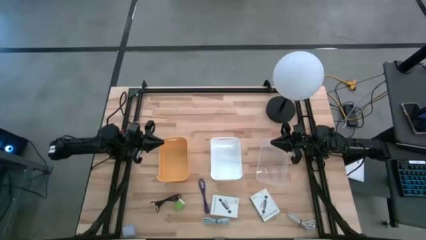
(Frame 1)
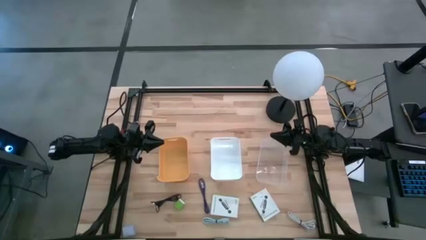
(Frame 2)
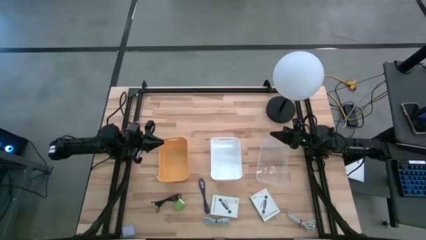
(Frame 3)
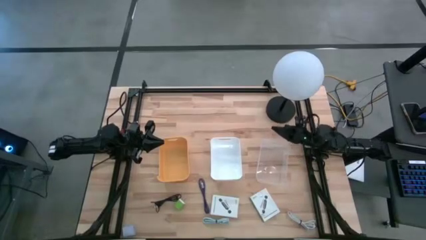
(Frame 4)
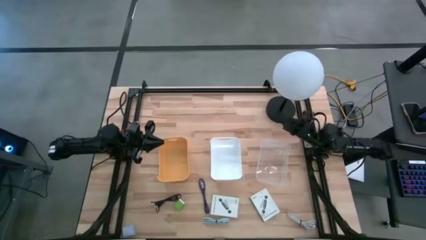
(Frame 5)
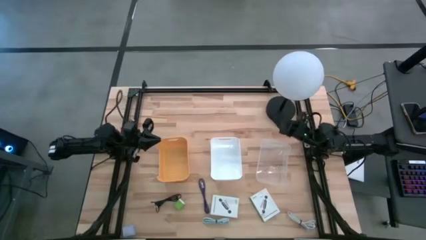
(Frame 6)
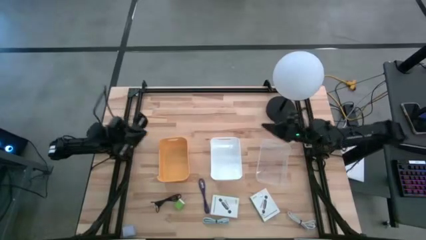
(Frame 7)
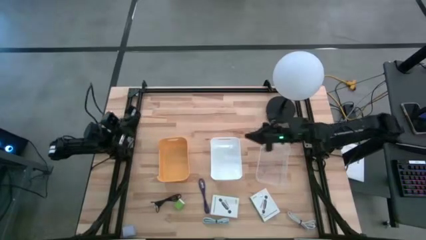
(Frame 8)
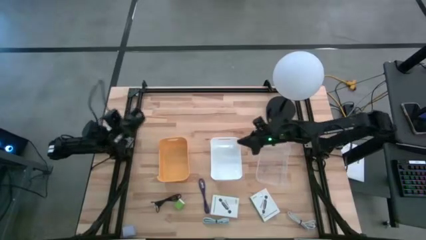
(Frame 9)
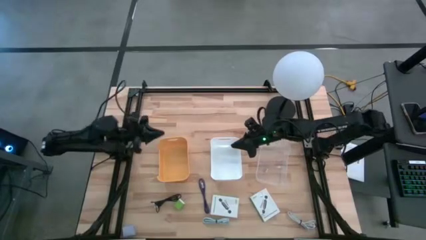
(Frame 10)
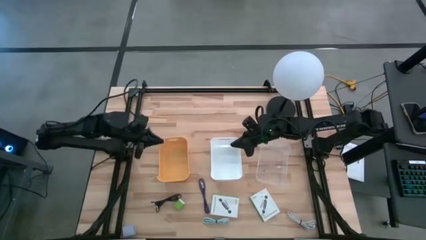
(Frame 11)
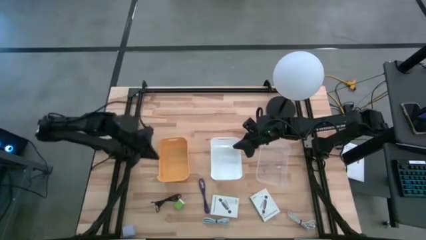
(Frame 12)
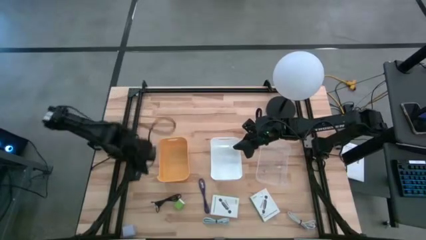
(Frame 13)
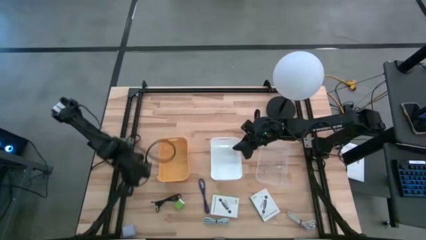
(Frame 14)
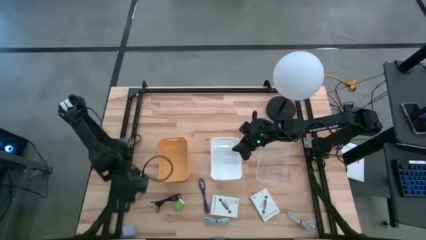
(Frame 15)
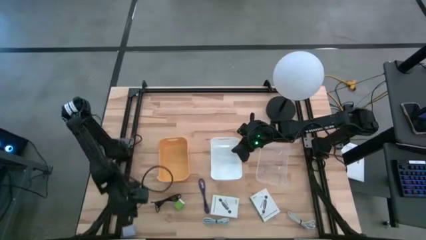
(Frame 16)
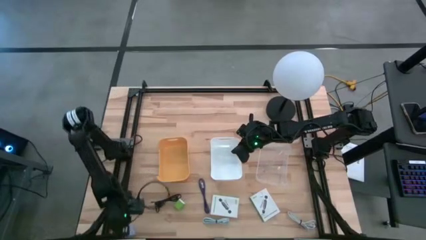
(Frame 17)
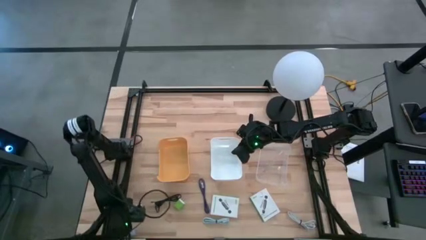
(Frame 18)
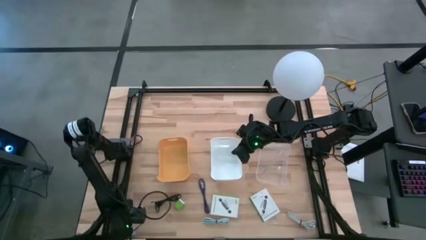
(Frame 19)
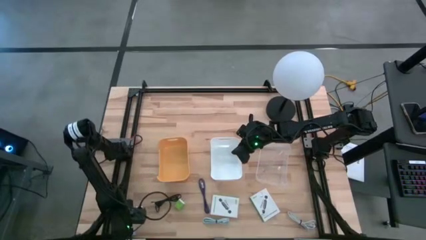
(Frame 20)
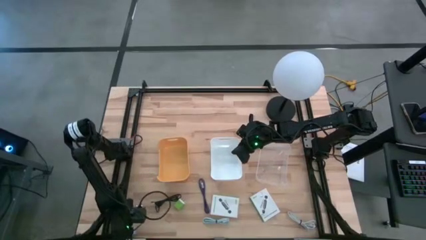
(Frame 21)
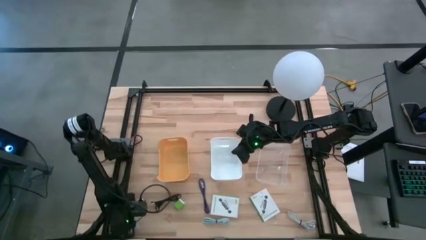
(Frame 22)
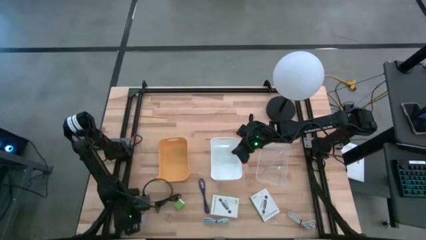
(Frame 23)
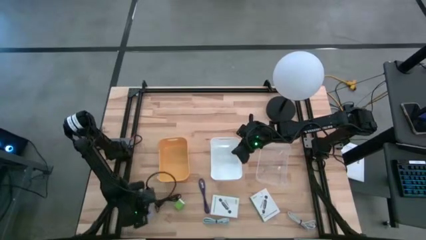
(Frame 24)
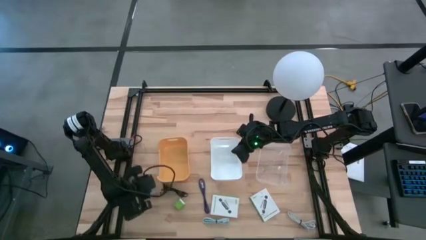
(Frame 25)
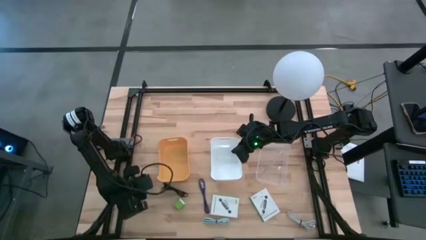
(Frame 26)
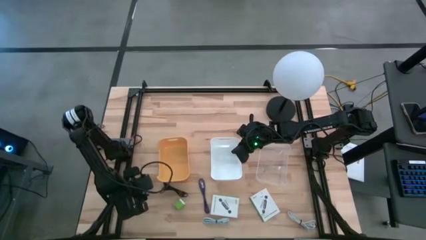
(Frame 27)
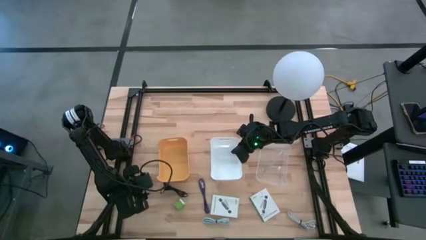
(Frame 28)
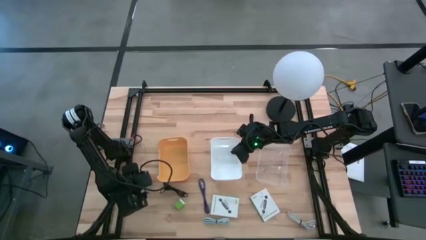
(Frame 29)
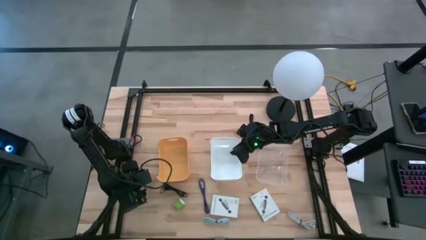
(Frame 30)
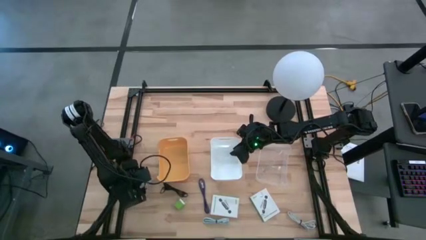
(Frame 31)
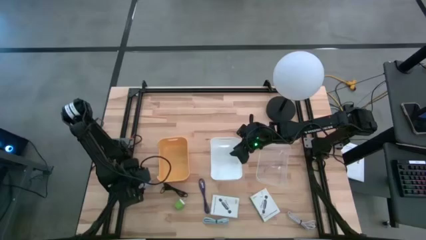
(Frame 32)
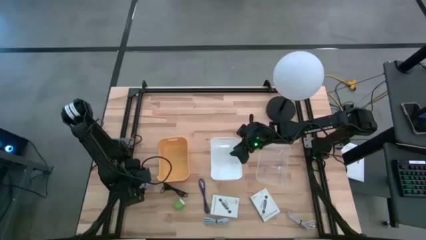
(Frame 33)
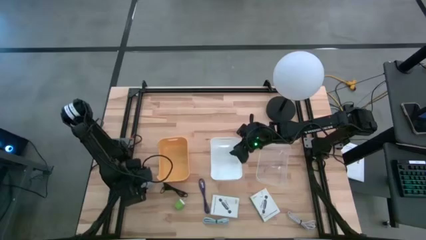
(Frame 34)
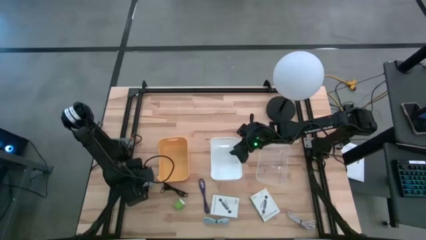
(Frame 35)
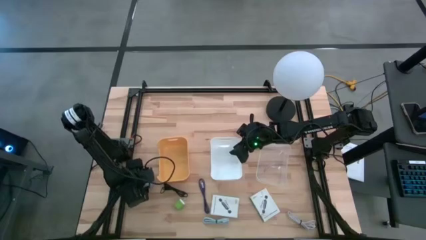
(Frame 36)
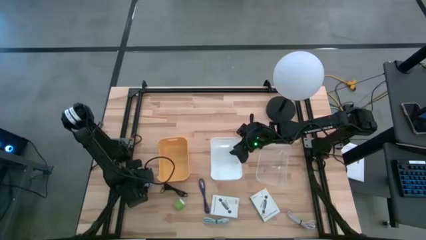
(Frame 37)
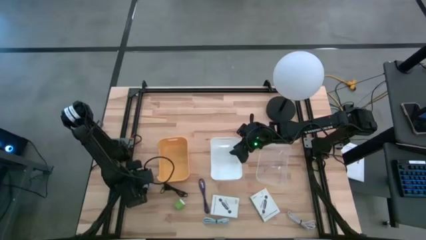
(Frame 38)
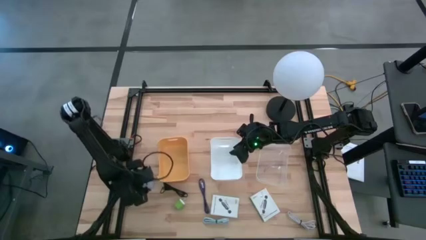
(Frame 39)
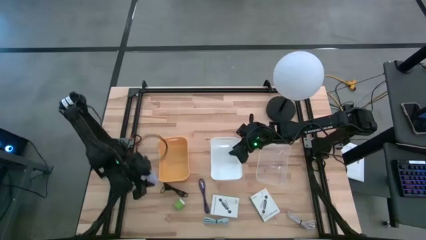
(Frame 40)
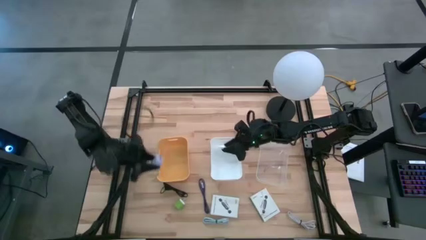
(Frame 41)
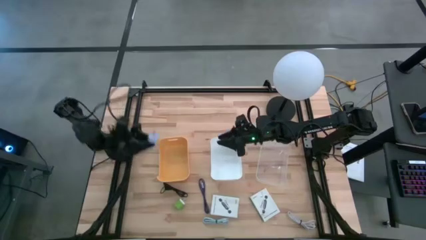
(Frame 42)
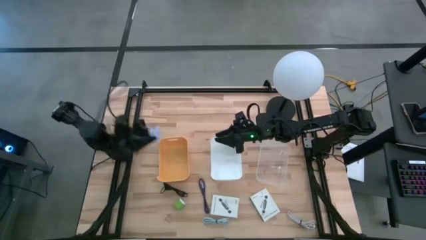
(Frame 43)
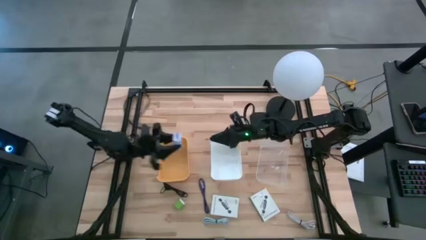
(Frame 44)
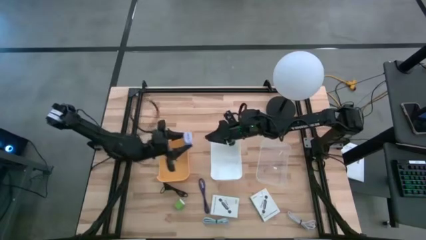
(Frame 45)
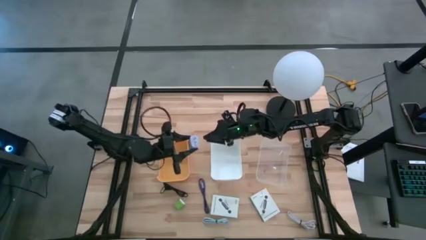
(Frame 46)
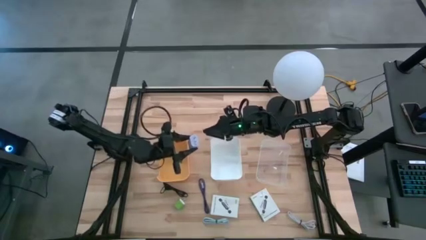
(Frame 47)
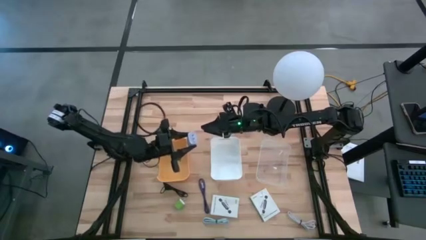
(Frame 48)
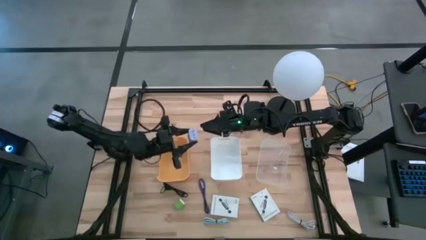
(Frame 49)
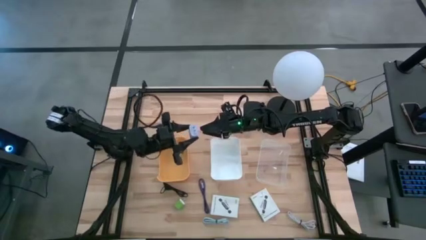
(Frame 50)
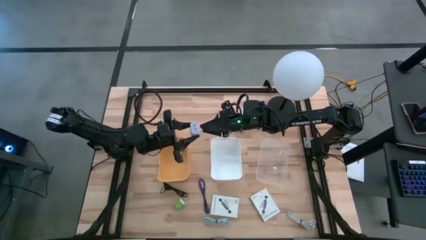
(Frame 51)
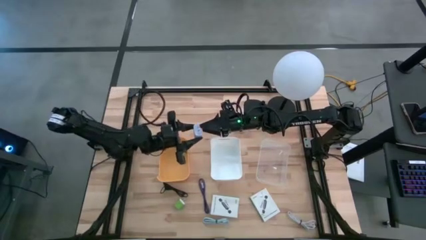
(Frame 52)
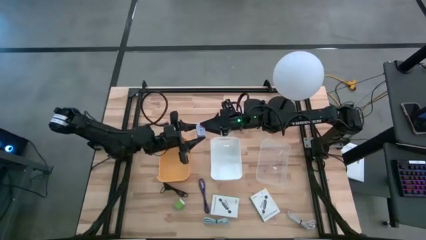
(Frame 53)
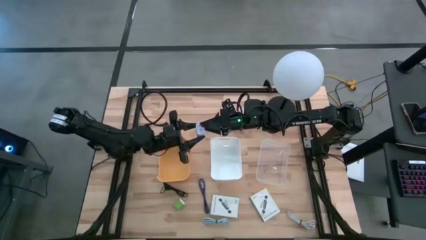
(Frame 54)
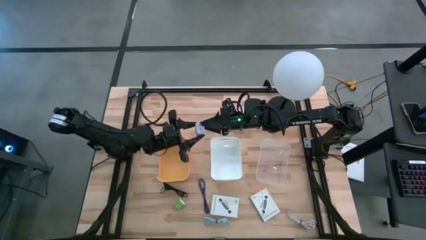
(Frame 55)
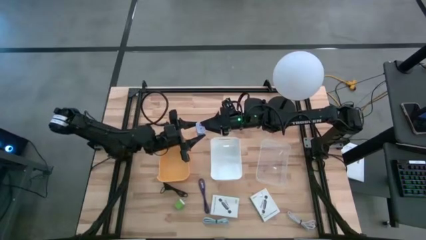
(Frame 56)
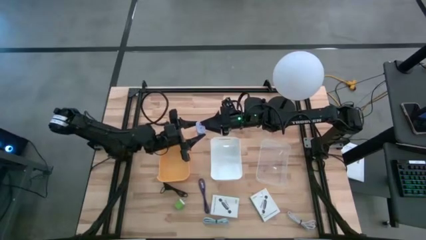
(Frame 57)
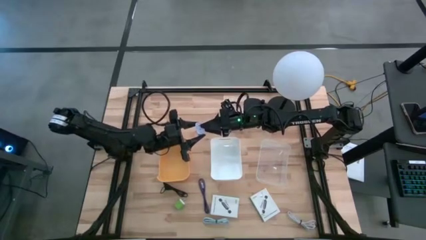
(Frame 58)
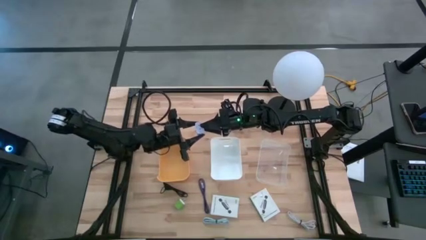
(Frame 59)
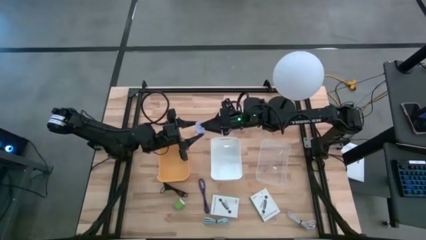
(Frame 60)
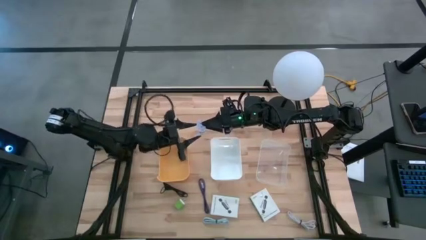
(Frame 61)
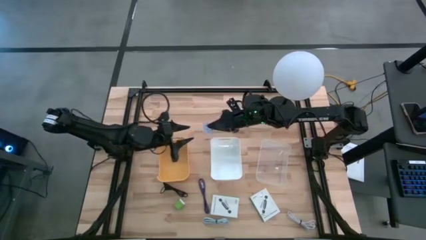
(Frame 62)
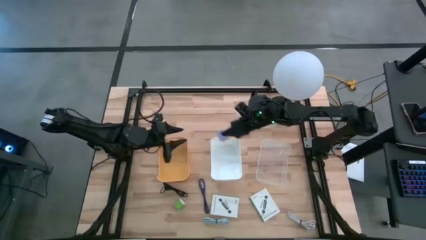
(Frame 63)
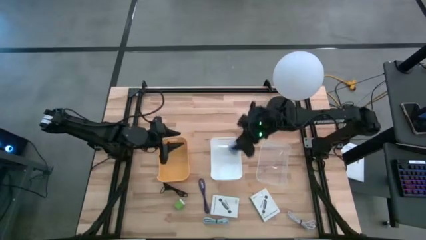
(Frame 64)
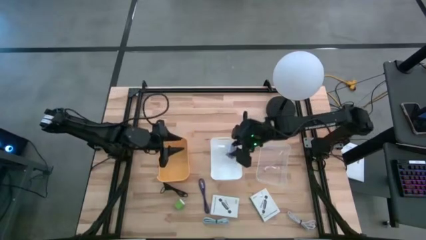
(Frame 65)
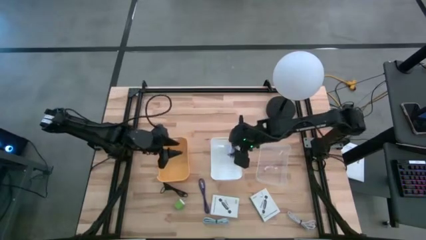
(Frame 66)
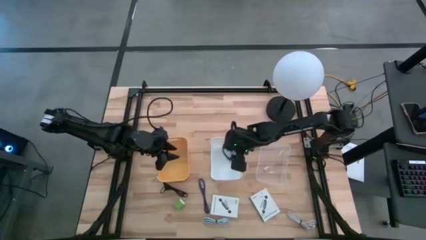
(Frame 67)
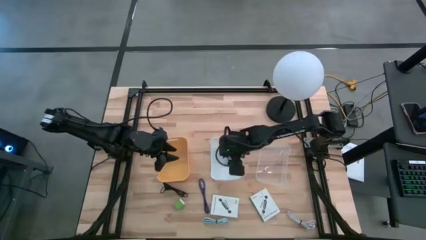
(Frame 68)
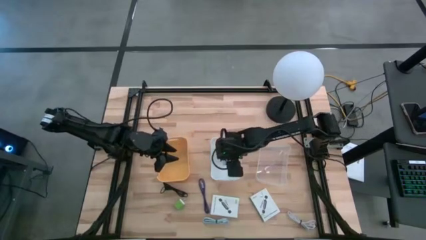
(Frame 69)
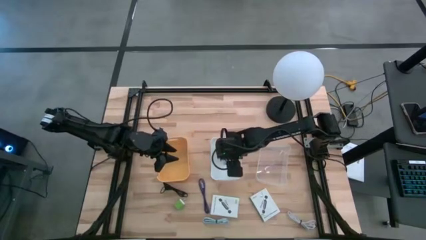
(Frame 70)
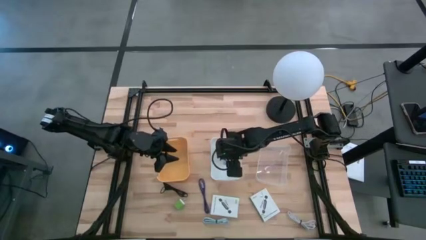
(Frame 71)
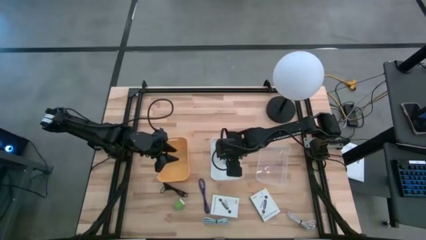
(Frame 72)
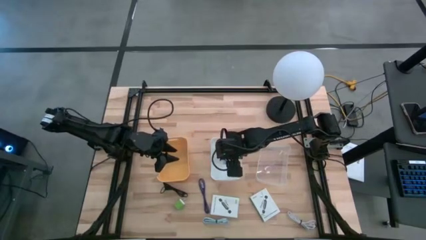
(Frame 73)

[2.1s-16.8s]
Task: Pick and place items into bin
Put the light blue charger adapter into the white bin
